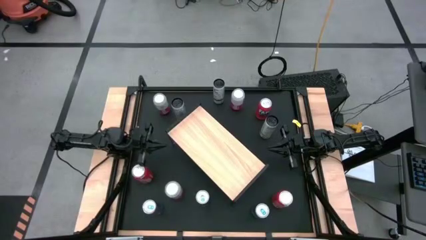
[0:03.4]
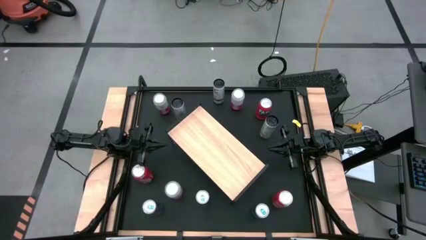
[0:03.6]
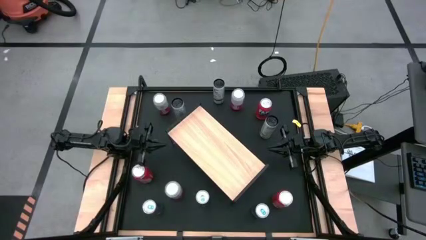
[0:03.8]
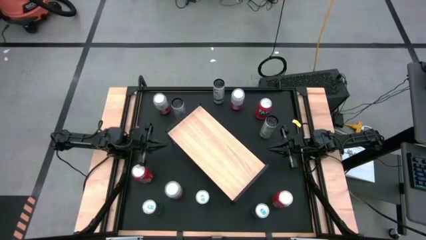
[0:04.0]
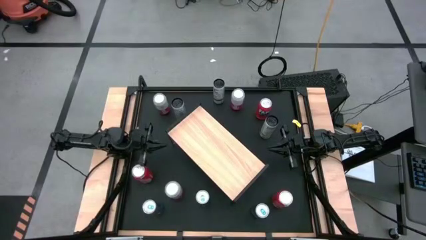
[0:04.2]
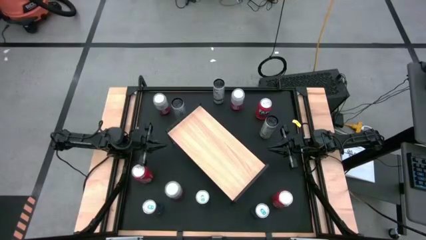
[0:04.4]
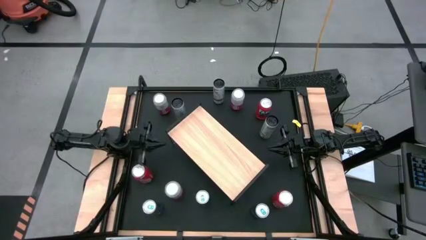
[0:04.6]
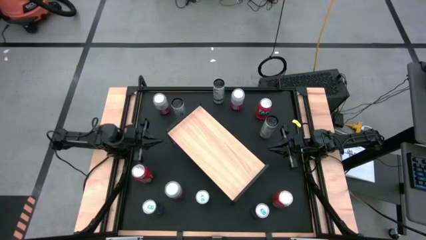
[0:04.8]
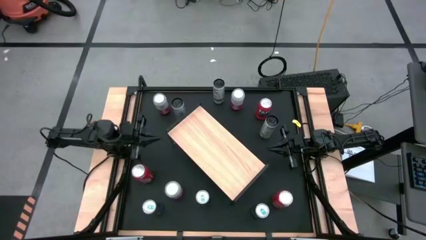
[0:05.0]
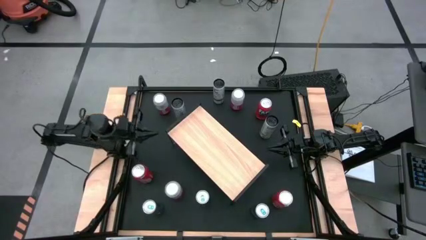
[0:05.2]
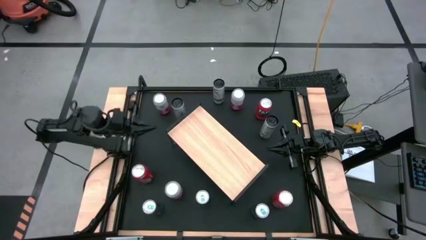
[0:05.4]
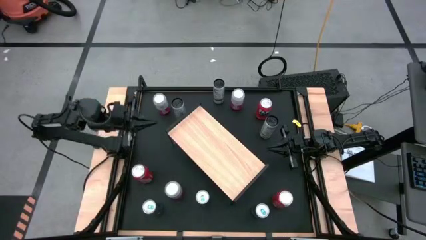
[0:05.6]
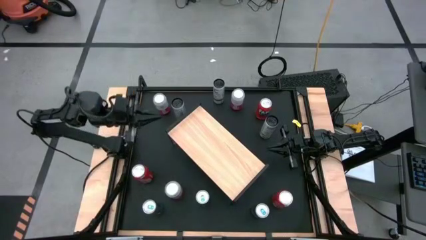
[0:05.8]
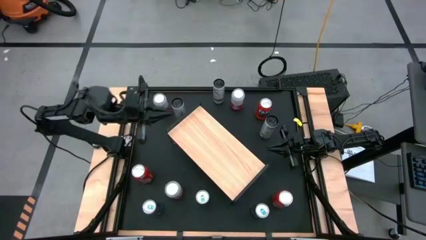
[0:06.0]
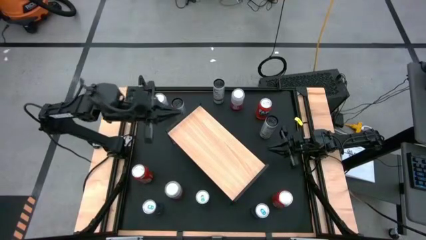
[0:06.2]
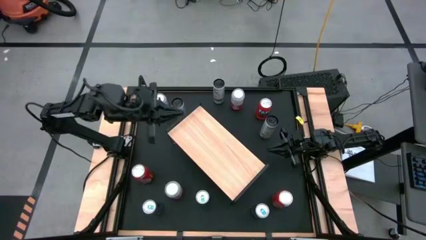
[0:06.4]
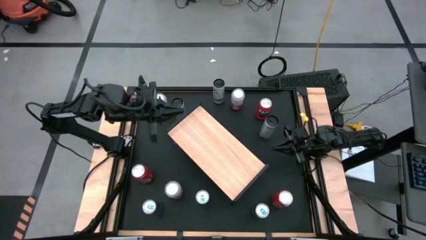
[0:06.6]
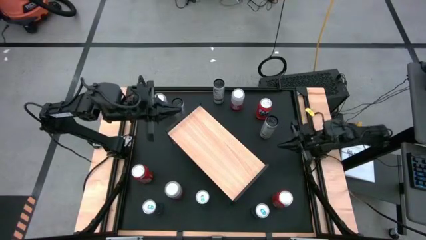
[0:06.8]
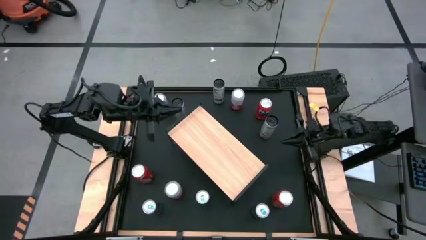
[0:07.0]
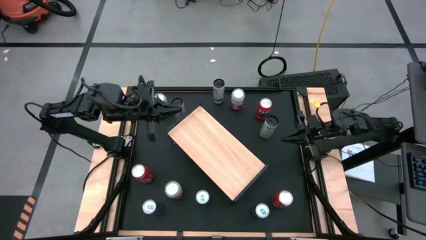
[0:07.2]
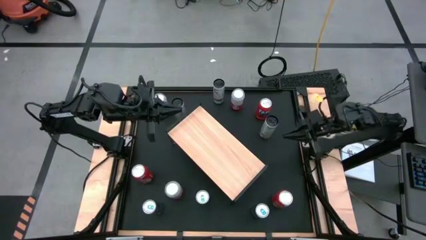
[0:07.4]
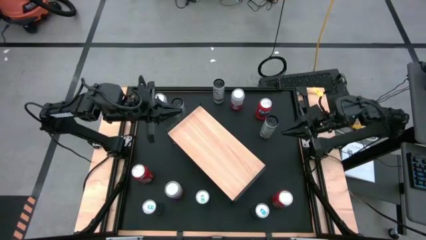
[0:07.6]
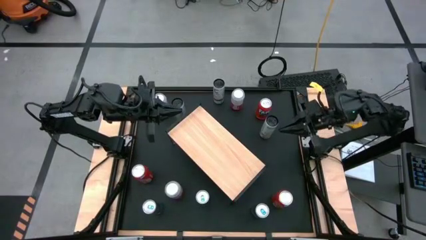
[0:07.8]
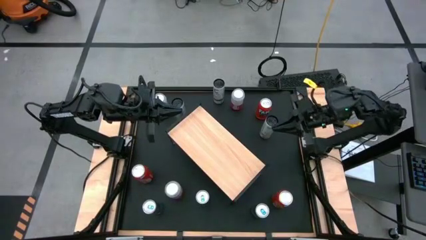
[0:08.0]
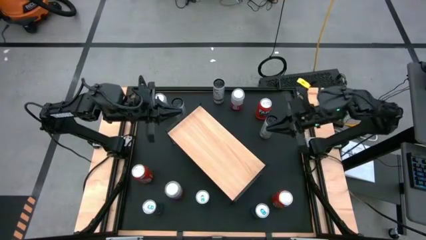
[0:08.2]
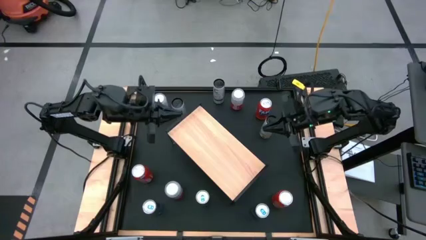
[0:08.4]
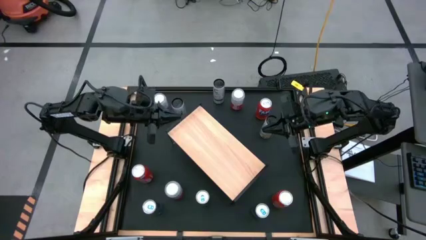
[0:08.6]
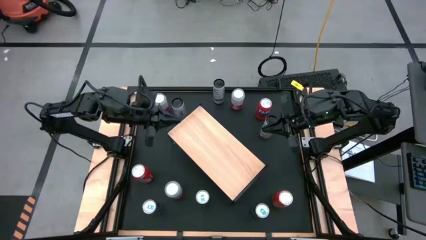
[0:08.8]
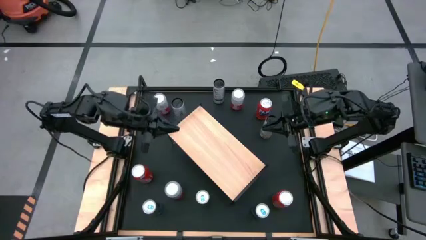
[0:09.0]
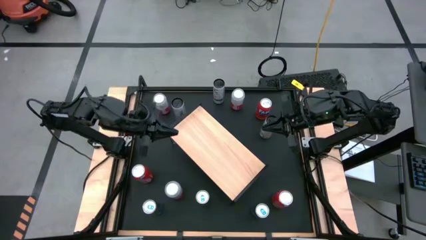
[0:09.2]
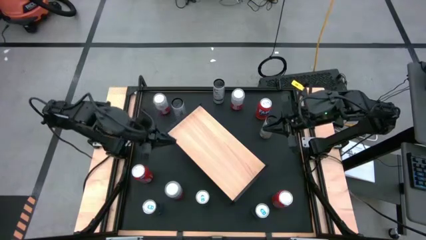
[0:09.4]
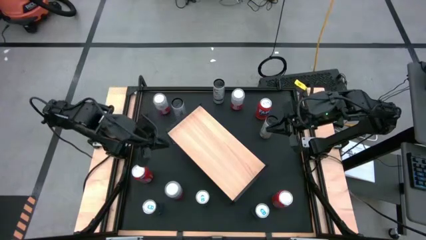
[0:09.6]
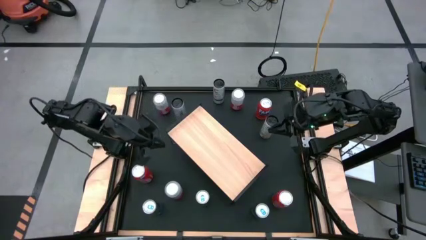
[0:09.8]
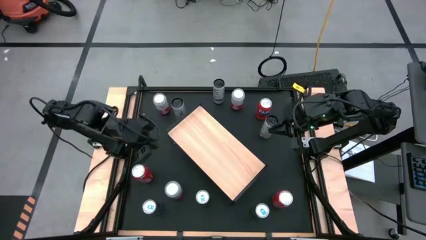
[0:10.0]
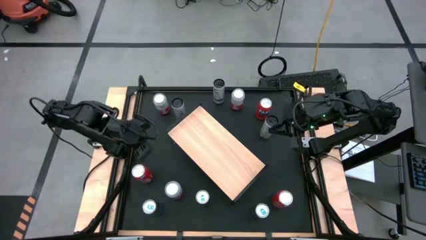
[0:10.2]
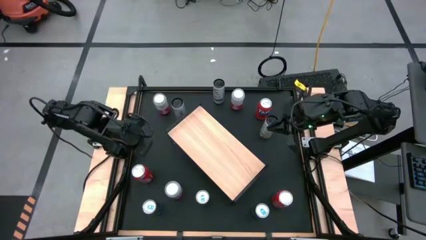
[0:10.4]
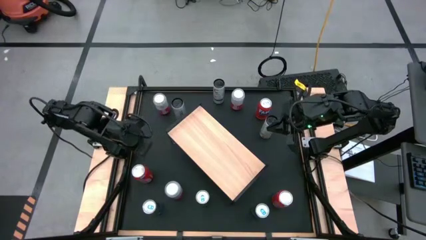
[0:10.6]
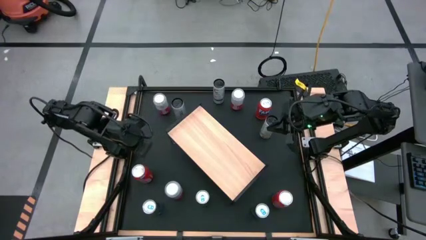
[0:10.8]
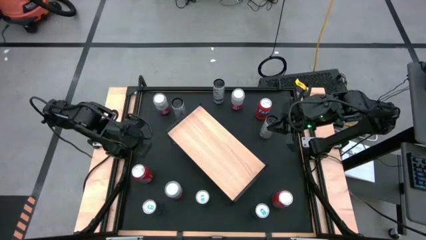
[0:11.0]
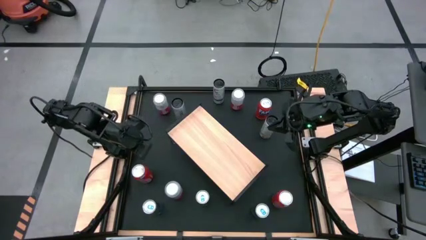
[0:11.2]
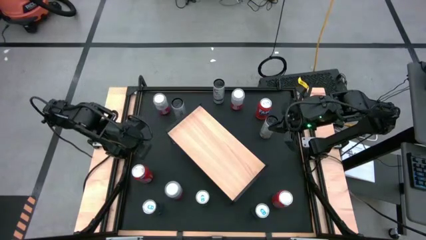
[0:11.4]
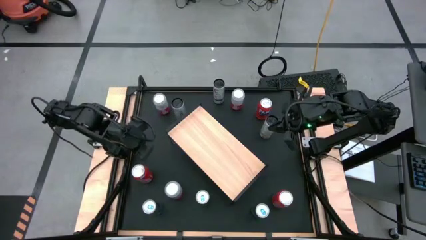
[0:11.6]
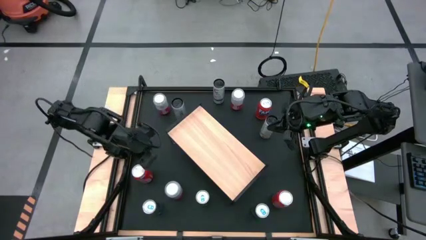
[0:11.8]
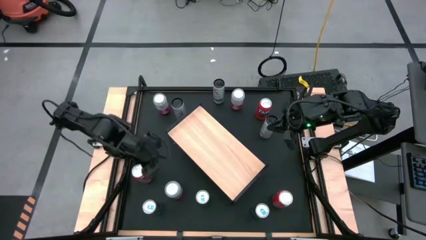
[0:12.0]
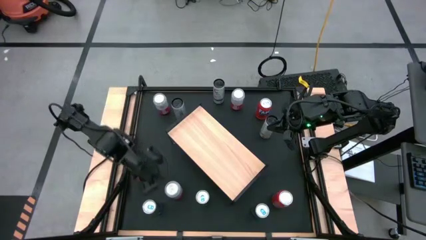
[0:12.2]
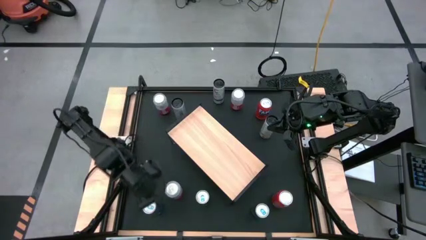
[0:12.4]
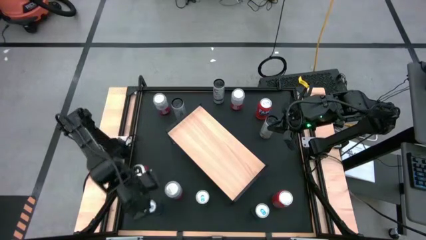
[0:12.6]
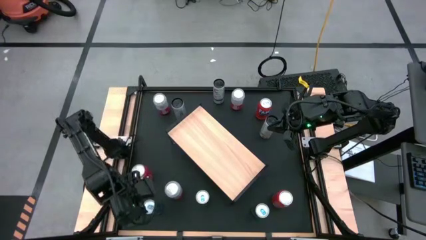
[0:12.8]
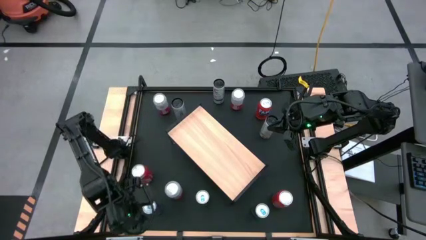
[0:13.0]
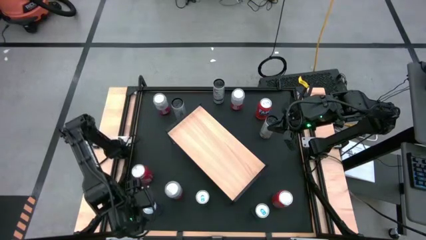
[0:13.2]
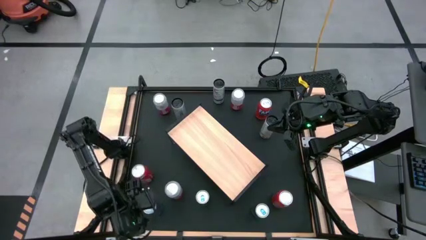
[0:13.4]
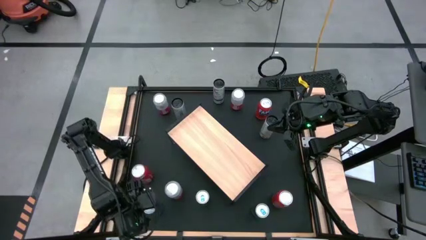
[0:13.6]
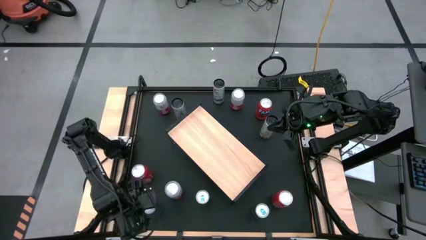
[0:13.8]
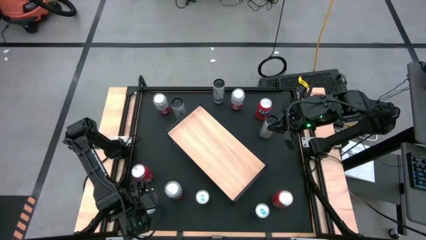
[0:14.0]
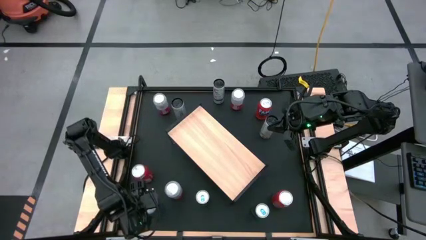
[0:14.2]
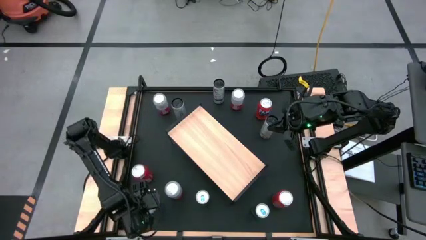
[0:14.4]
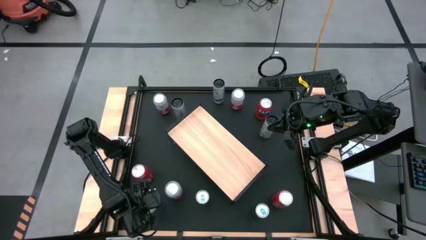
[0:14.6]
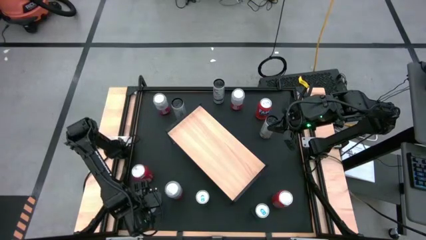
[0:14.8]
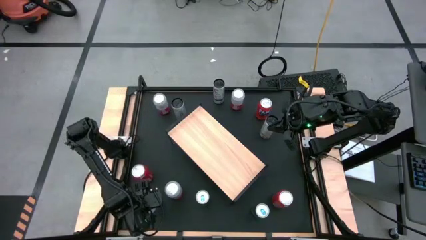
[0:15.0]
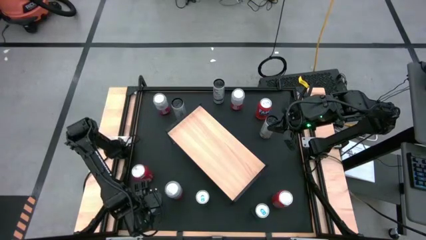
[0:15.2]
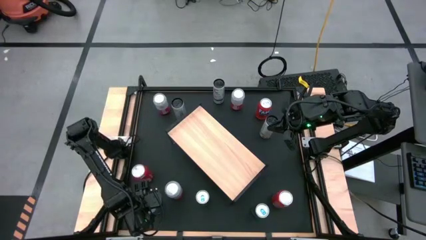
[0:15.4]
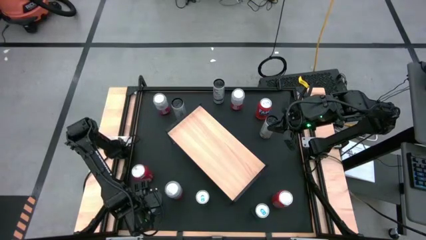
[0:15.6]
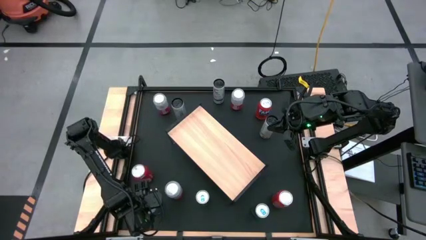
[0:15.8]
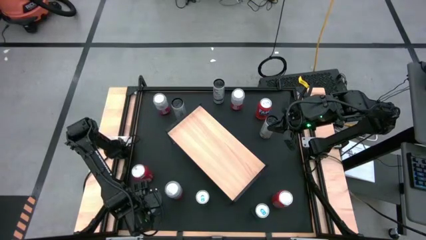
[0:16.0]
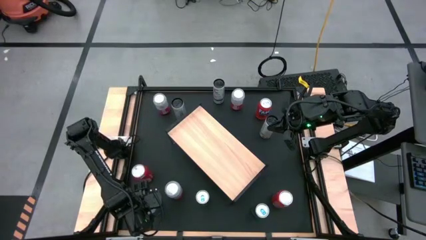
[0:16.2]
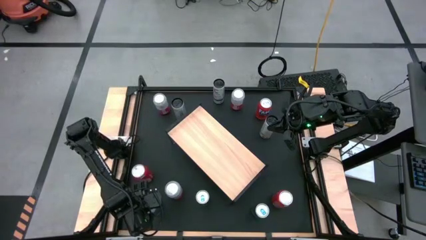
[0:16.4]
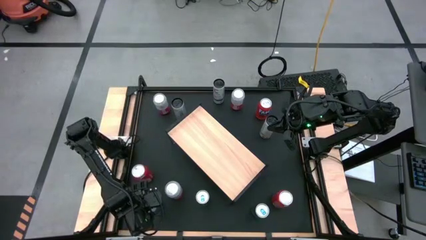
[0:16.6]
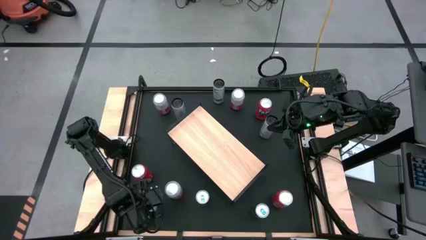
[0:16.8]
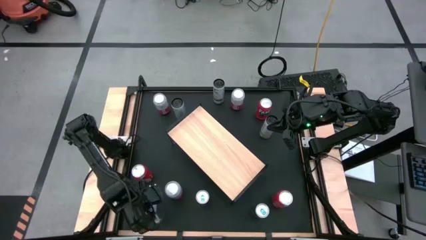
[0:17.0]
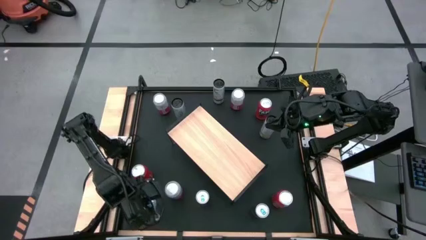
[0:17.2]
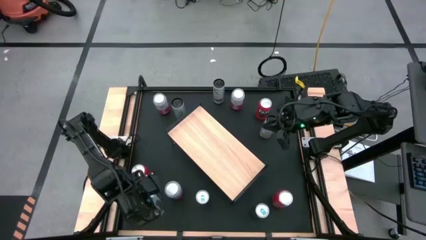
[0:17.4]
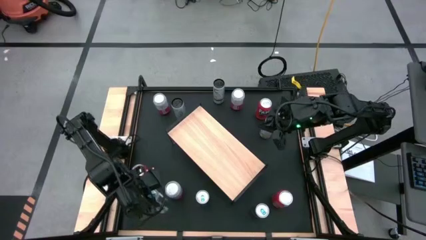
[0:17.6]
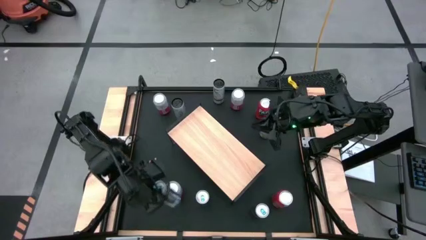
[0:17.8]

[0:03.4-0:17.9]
Task: Place canned beverage on shelf
Put the bottom left blue soda can on the shelf
